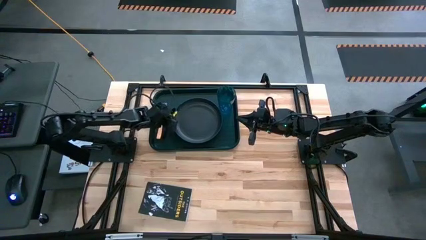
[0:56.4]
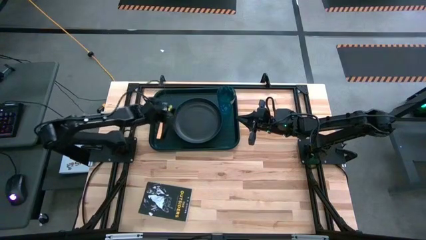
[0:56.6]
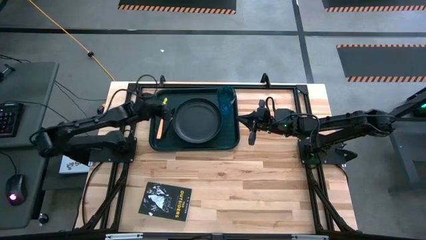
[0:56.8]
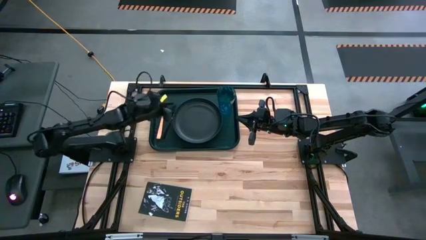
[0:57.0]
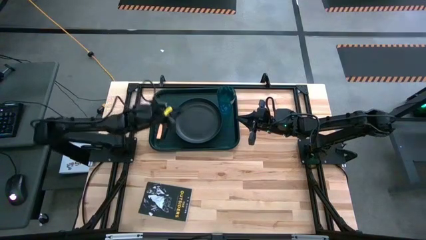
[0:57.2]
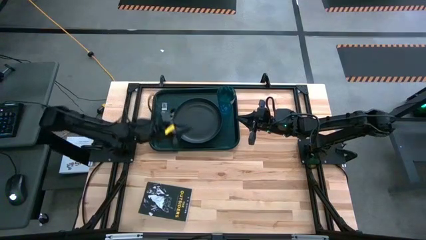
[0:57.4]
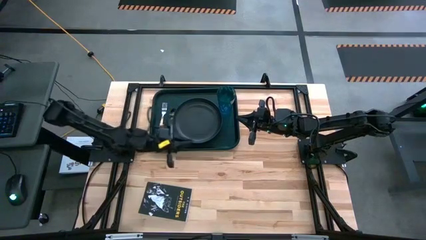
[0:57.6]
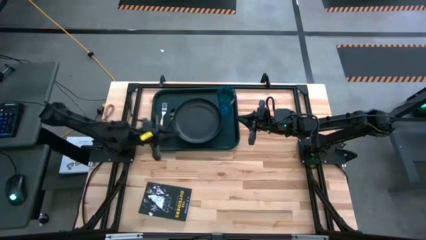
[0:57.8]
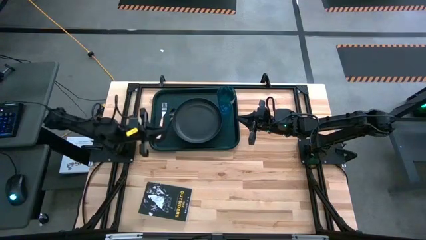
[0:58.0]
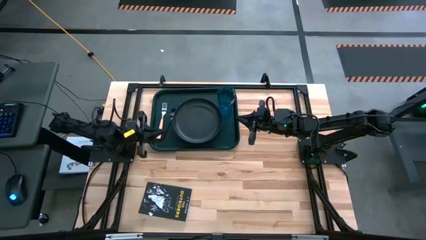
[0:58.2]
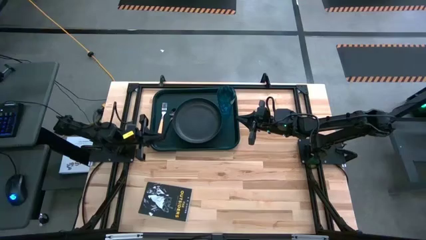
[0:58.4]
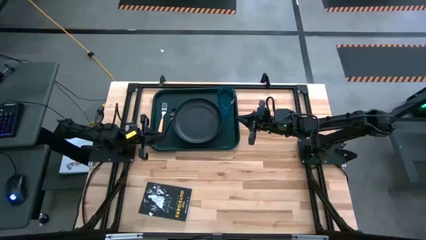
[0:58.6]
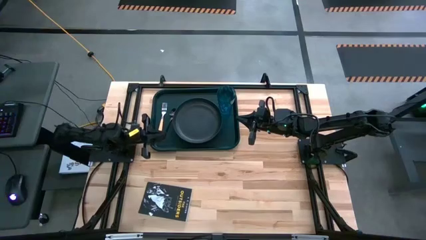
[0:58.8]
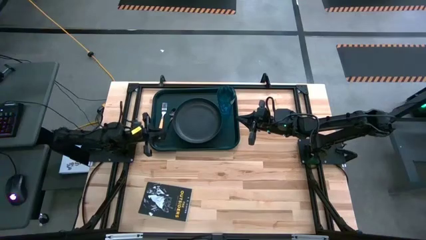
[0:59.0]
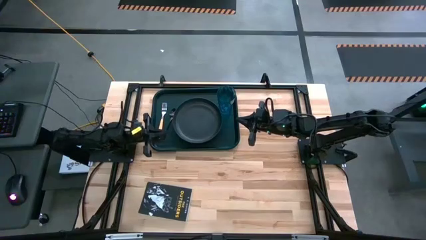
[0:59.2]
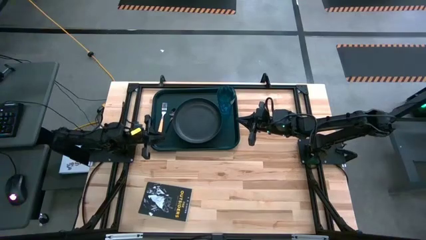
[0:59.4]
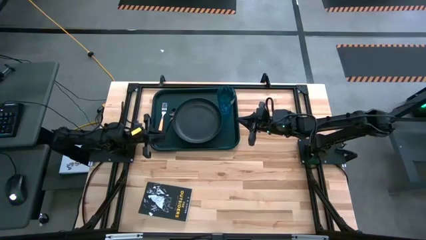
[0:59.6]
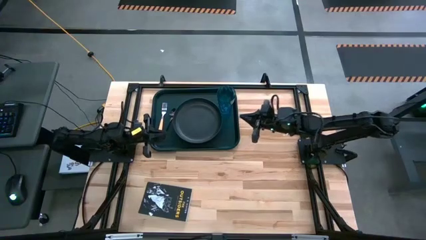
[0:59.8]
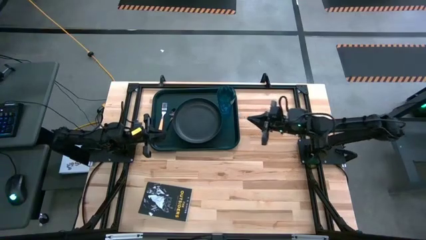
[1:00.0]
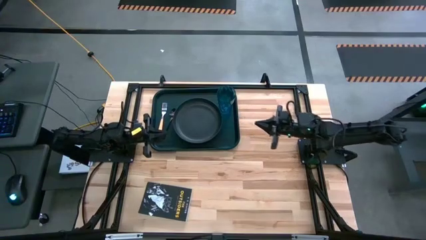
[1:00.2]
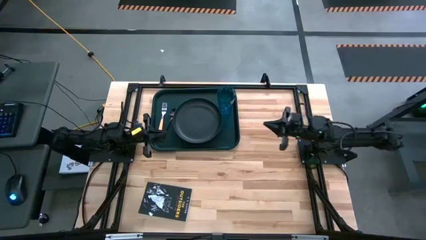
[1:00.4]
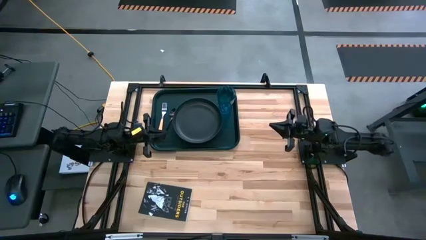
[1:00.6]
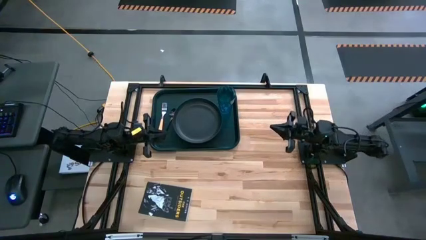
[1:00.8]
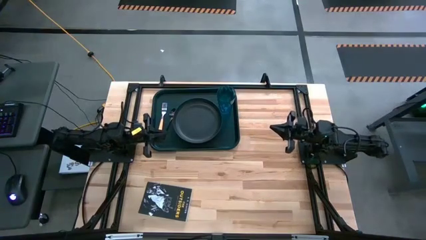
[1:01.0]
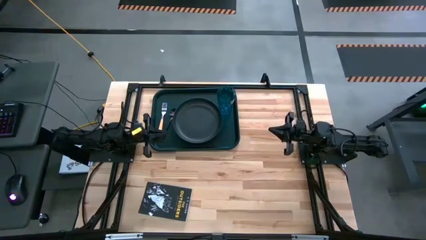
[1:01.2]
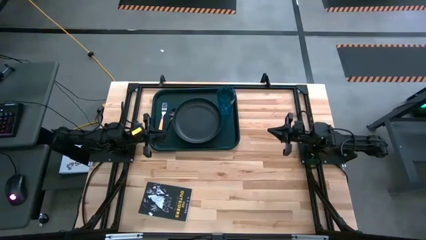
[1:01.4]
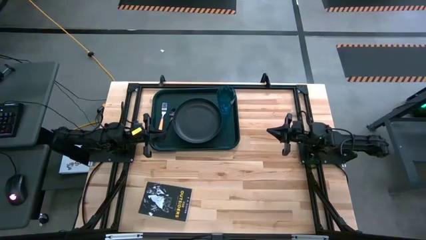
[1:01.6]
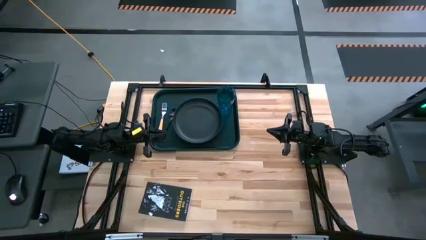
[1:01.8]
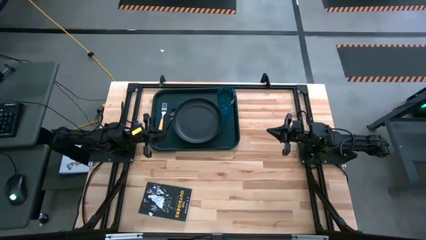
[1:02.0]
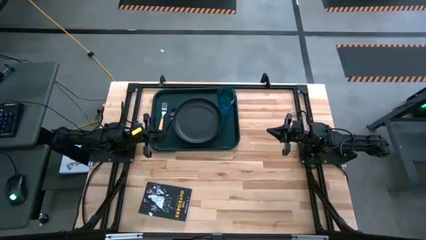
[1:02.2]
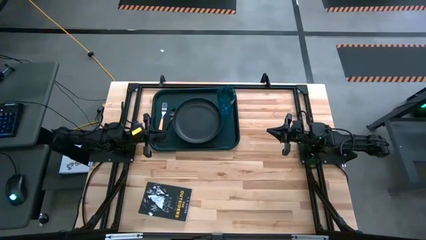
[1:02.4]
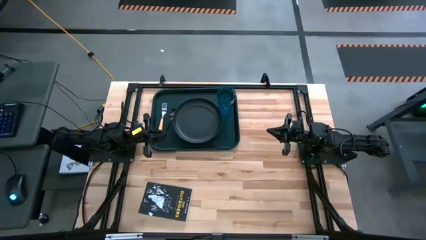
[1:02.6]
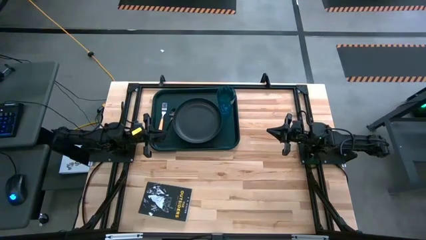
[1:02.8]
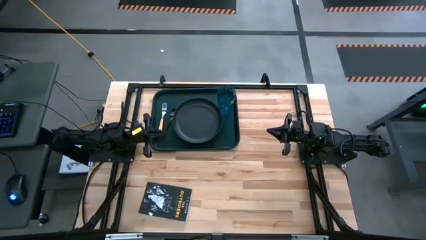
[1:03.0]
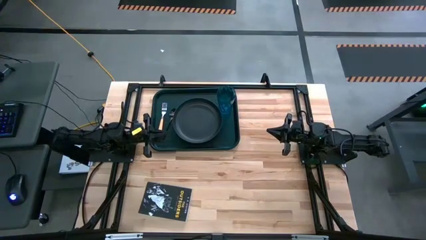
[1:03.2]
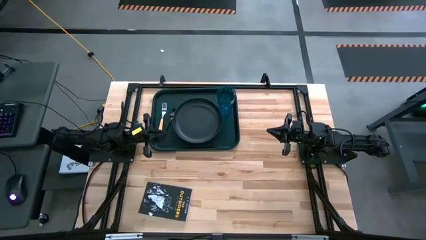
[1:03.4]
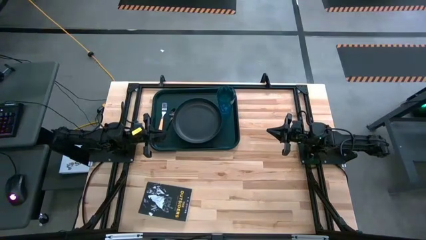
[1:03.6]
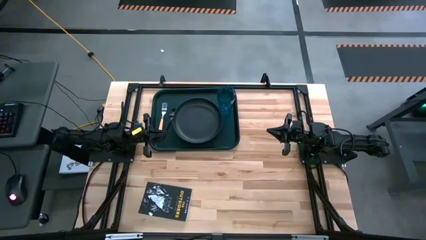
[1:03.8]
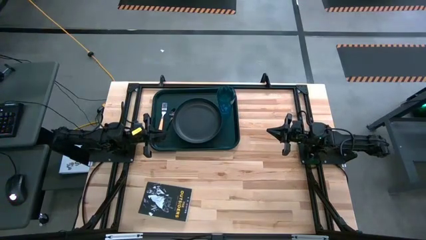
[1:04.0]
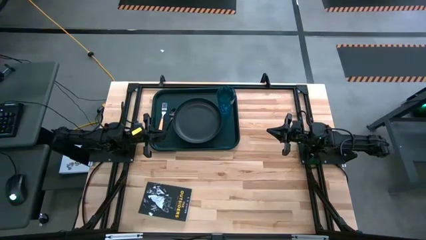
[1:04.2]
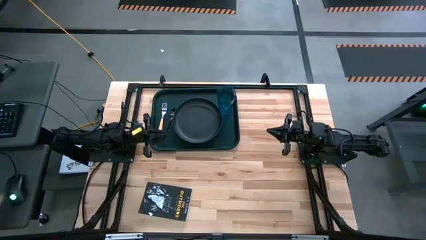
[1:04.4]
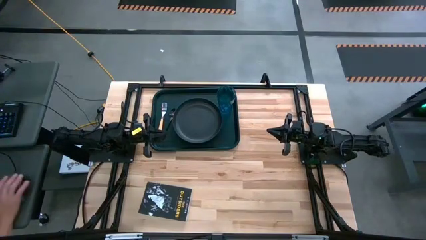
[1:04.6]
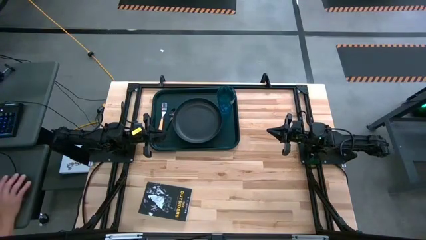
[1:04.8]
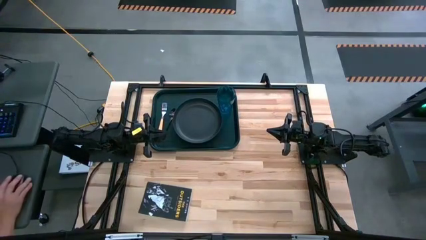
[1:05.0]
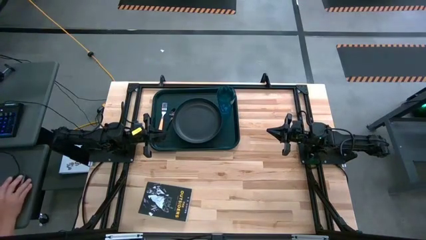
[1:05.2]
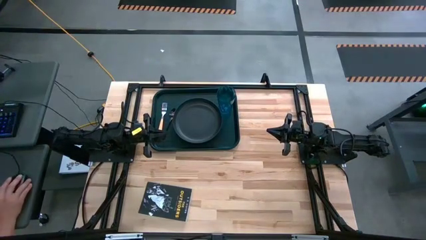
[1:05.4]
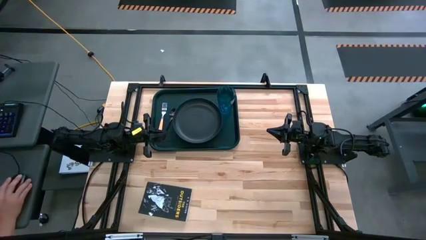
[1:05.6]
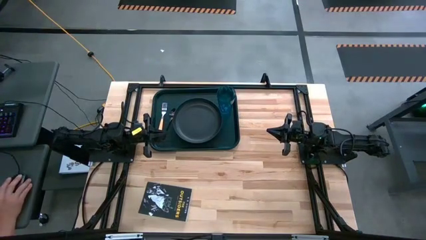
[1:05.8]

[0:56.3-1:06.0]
Task: Pick and place plate/cup/fork/spoon on tray
Return to Home Position

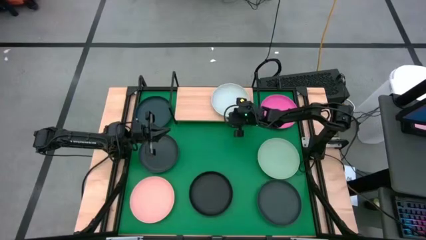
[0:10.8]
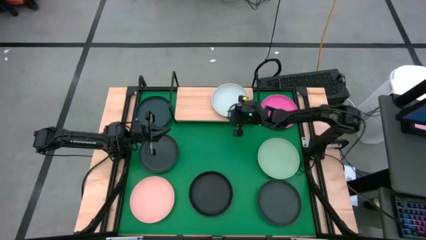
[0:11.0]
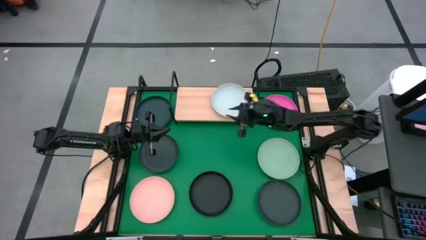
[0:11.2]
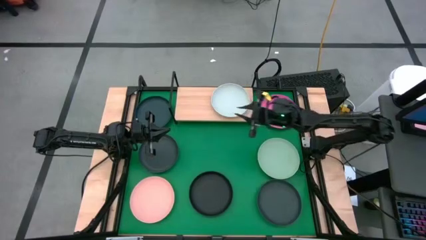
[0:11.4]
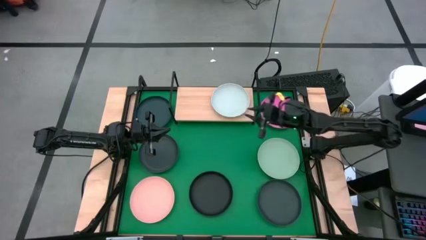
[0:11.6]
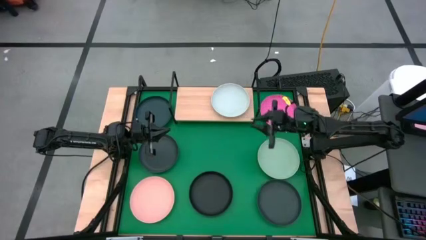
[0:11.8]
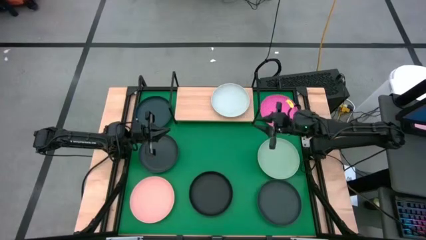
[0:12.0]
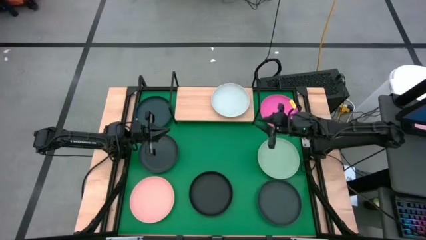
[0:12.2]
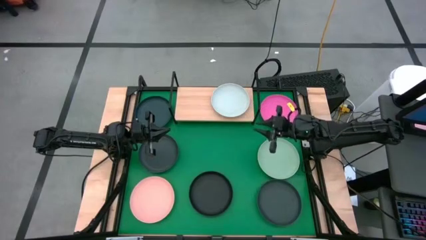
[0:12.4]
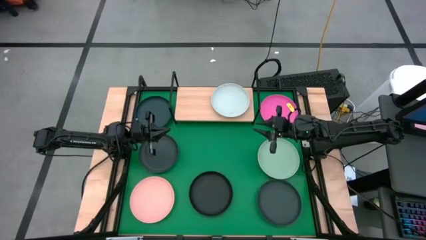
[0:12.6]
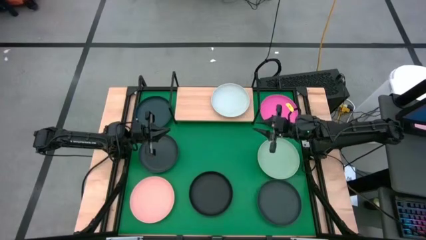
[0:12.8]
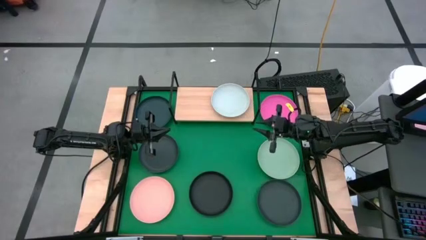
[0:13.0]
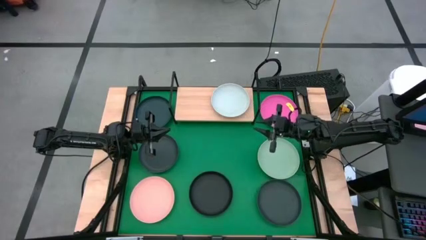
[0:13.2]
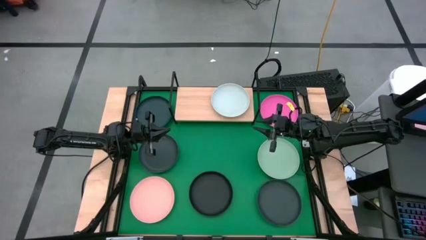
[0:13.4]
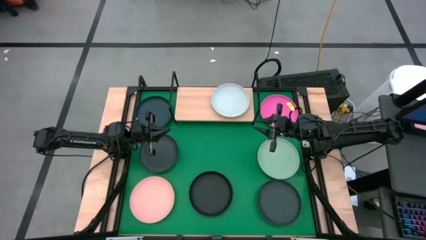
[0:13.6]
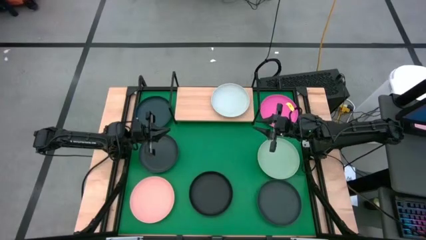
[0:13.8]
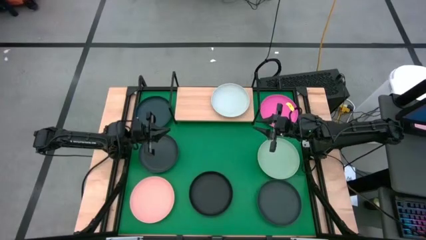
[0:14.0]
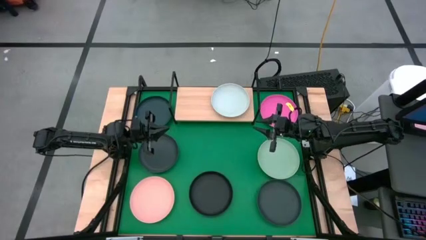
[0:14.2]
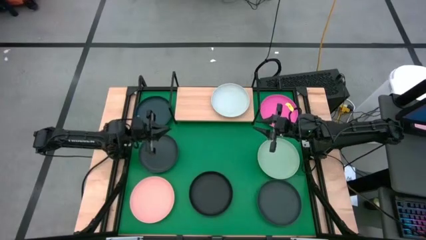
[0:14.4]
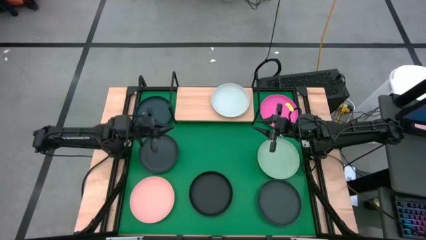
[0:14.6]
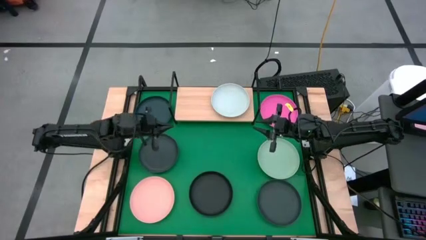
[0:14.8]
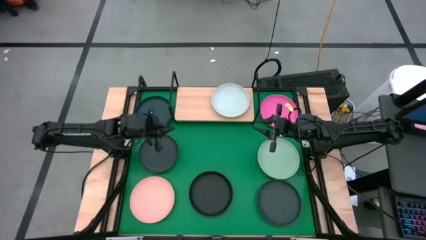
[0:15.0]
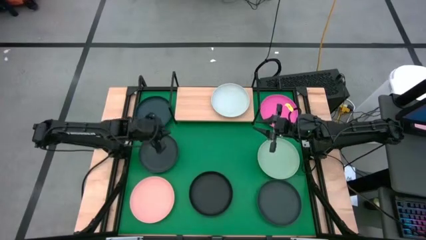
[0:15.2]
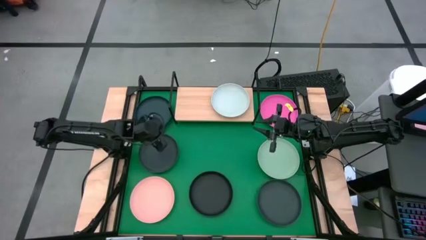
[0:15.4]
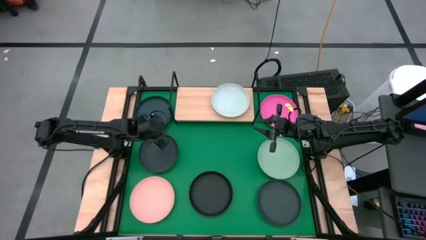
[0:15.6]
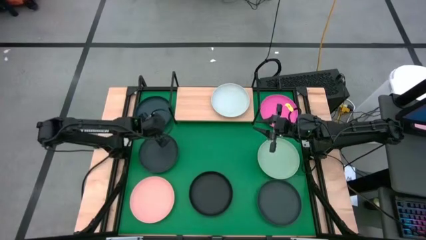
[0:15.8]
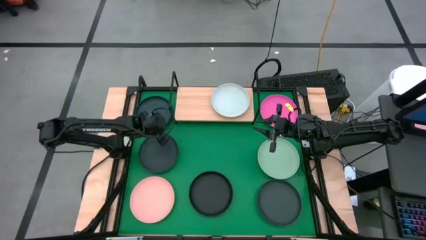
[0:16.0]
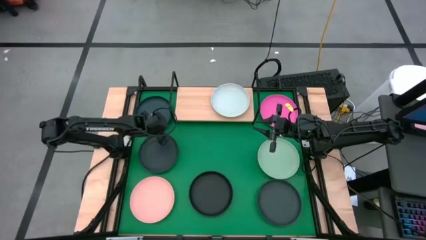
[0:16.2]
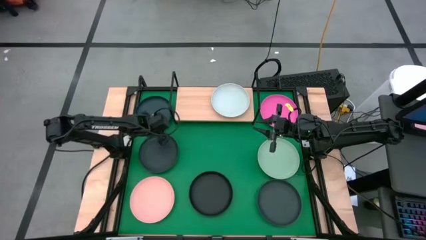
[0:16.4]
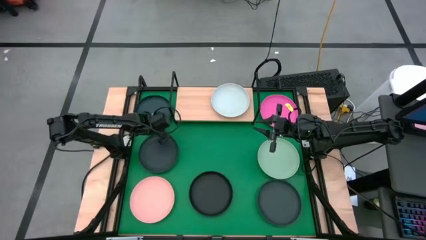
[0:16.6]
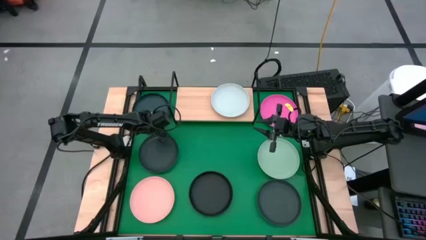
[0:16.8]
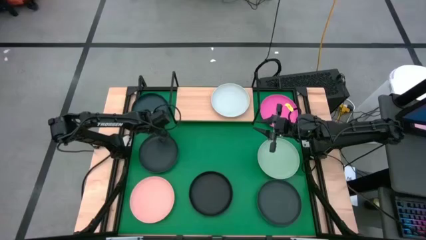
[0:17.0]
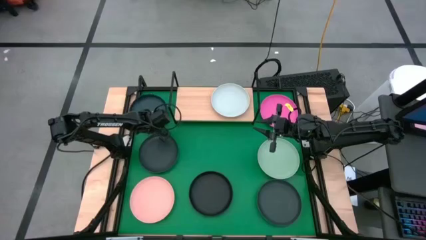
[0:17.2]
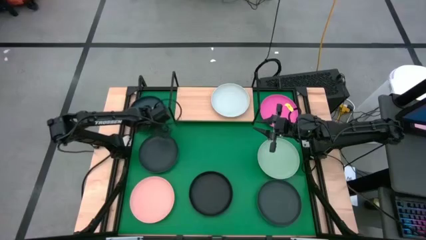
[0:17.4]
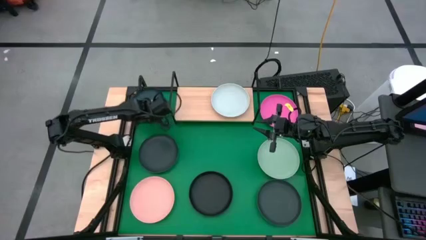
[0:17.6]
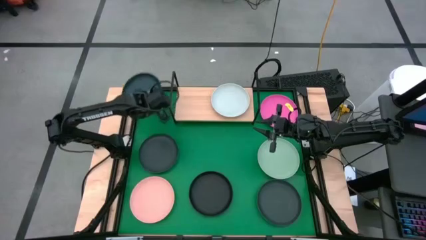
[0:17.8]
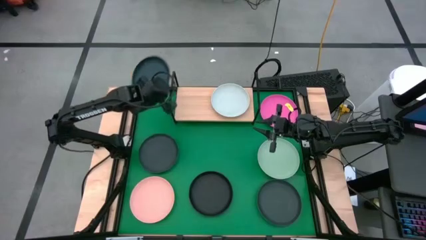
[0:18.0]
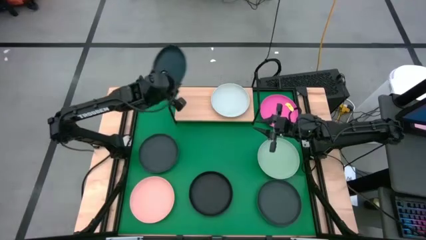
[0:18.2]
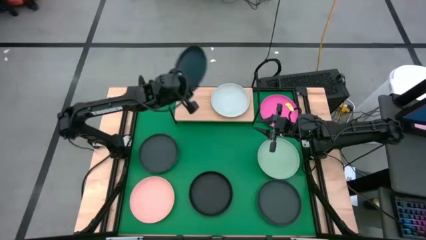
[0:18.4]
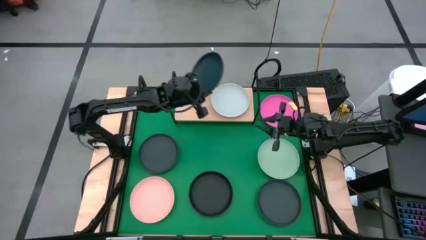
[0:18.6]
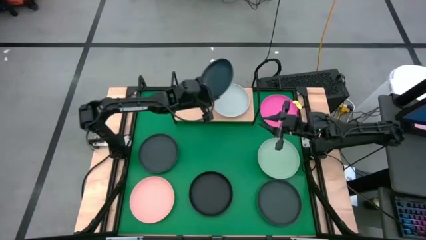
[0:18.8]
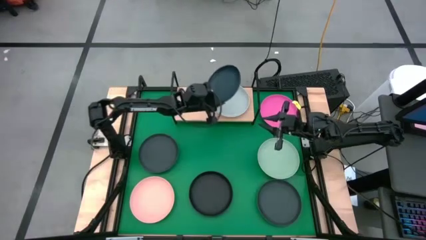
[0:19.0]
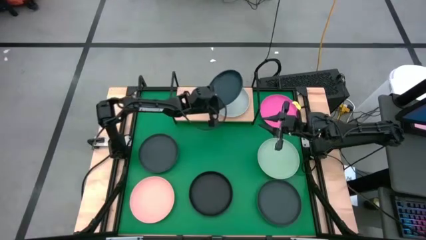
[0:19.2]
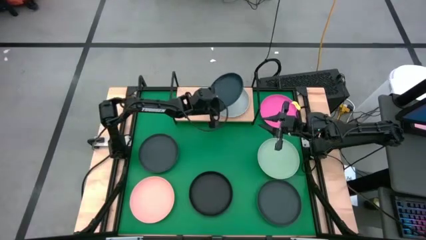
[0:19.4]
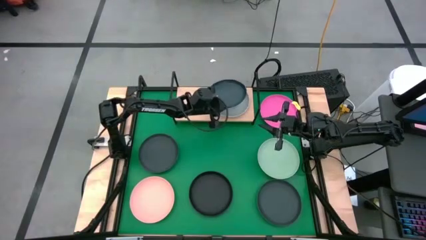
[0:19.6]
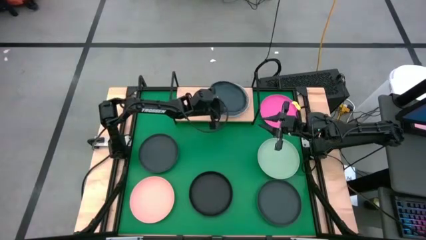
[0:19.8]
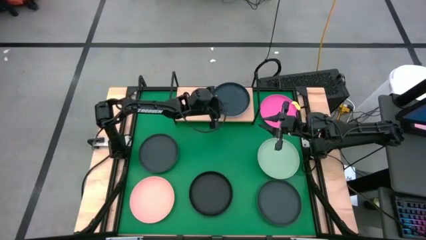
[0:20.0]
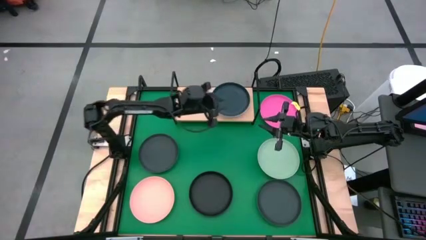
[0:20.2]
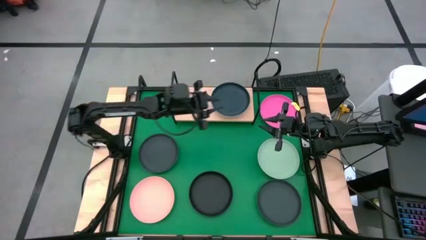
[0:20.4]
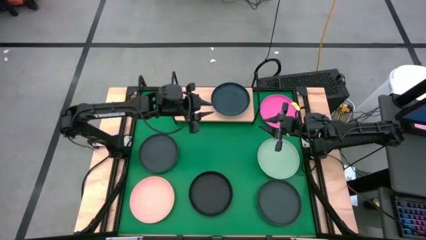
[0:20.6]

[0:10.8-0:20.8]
Task: Place and stack plates onto a shelf
Stack the top black plate on top of the light blue plate
